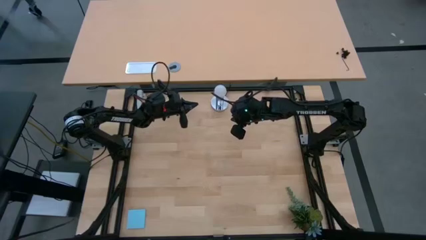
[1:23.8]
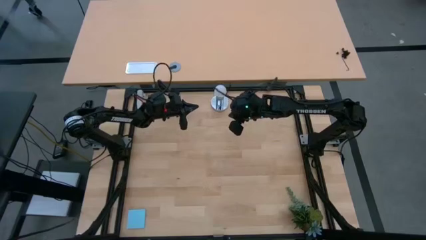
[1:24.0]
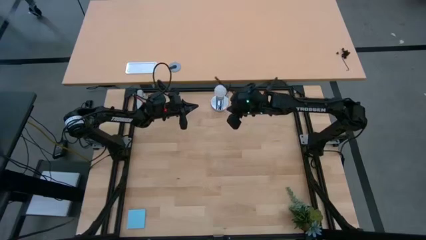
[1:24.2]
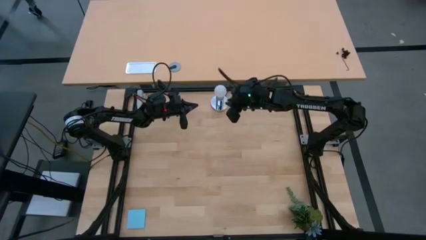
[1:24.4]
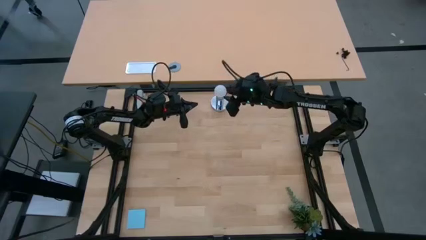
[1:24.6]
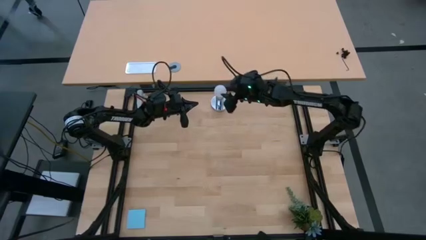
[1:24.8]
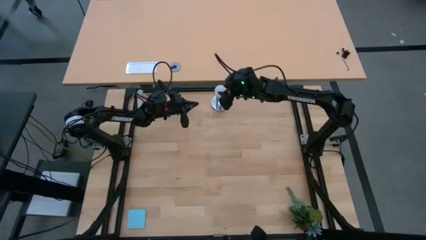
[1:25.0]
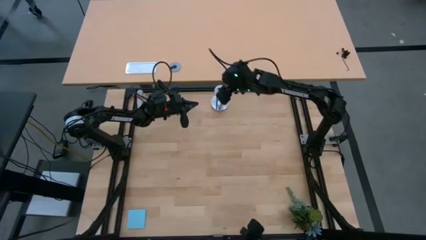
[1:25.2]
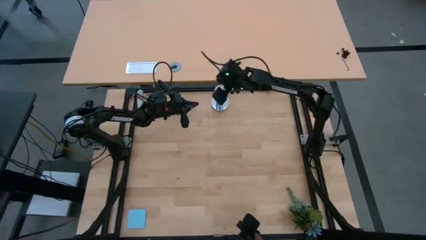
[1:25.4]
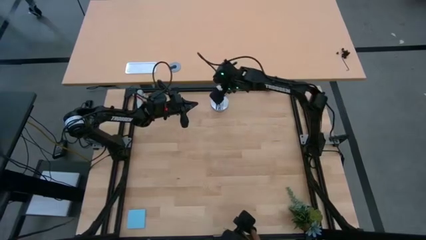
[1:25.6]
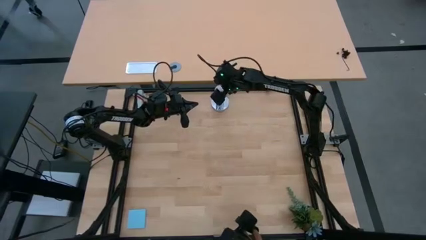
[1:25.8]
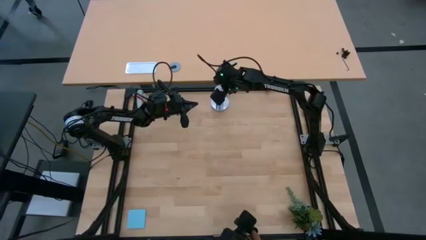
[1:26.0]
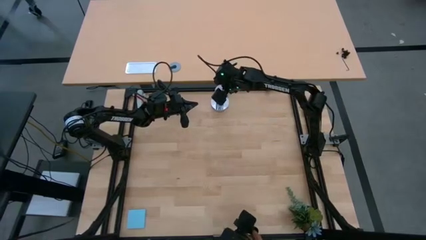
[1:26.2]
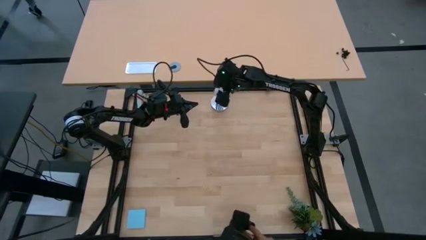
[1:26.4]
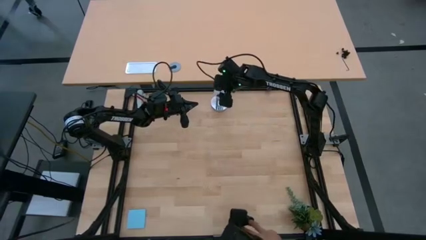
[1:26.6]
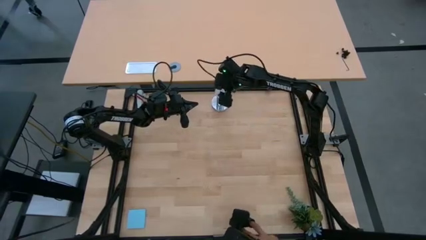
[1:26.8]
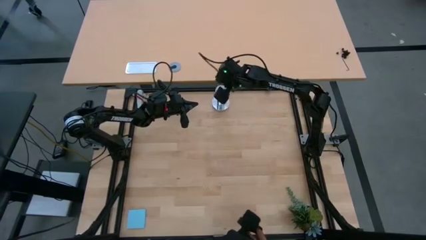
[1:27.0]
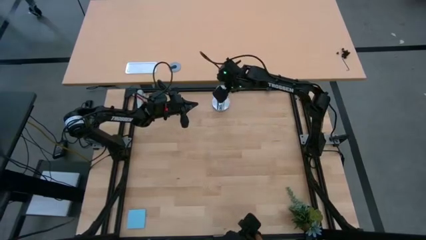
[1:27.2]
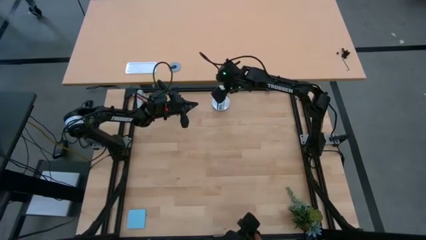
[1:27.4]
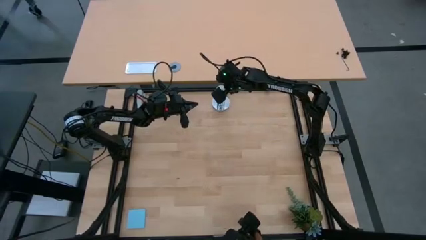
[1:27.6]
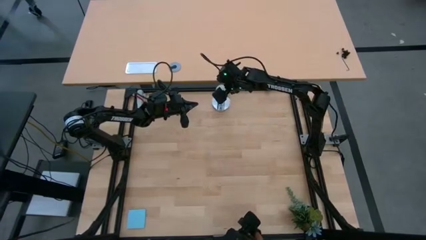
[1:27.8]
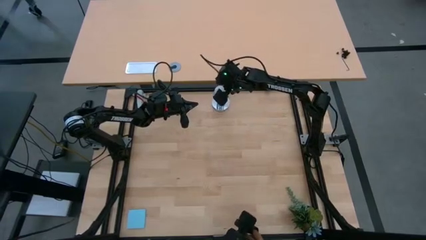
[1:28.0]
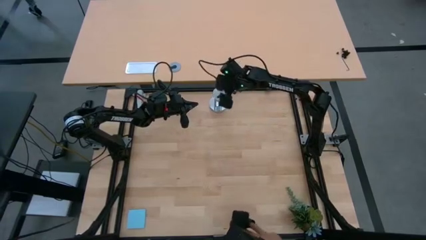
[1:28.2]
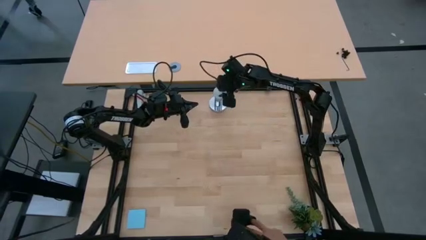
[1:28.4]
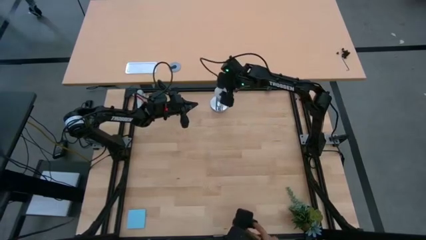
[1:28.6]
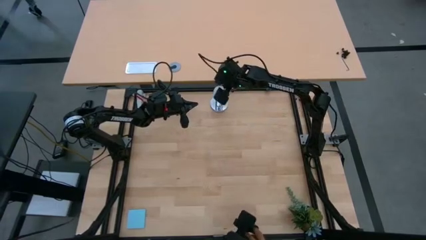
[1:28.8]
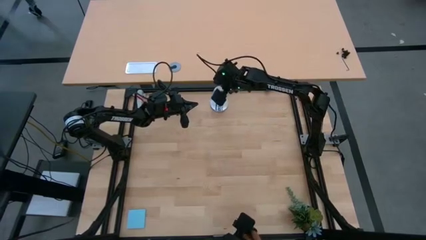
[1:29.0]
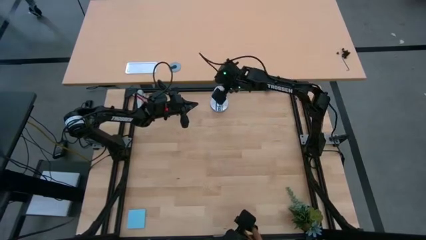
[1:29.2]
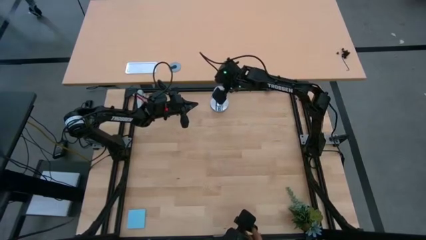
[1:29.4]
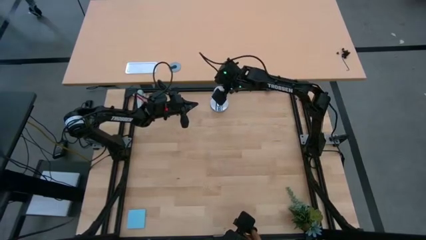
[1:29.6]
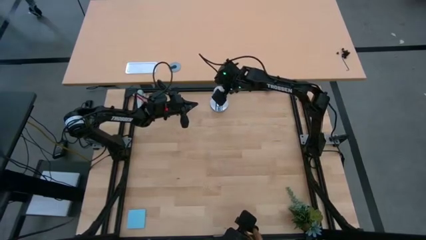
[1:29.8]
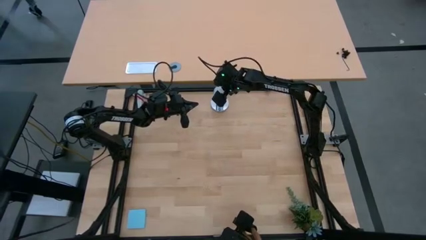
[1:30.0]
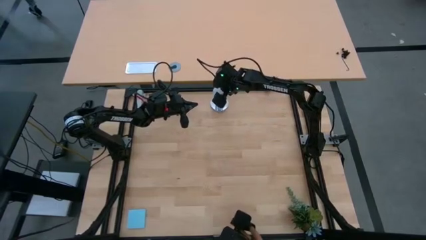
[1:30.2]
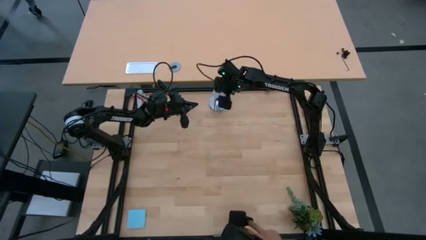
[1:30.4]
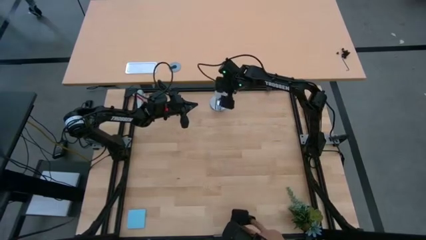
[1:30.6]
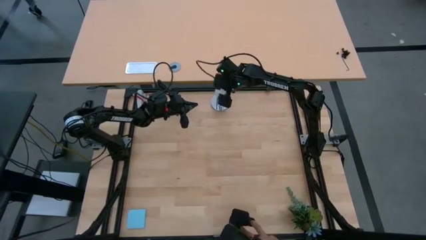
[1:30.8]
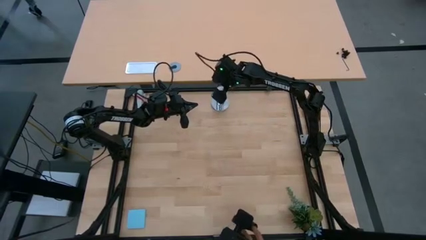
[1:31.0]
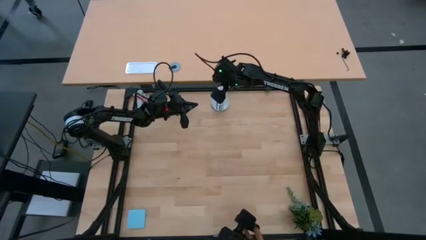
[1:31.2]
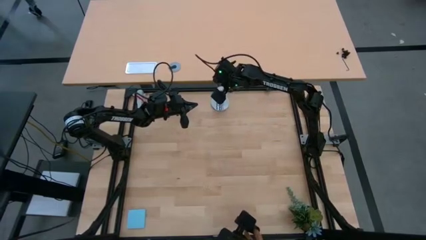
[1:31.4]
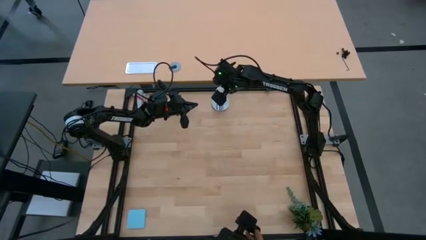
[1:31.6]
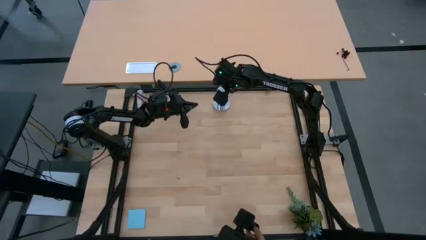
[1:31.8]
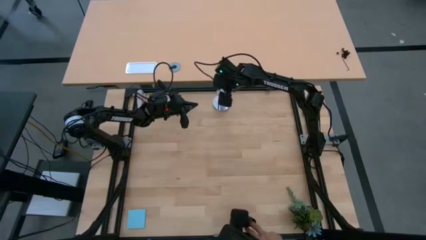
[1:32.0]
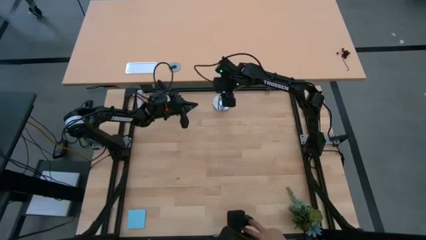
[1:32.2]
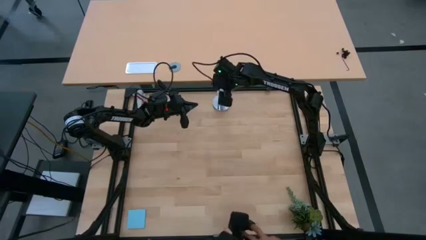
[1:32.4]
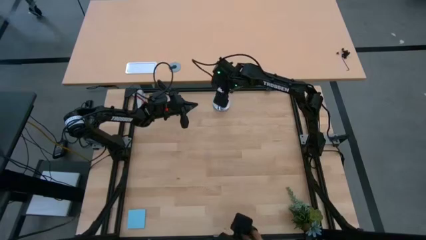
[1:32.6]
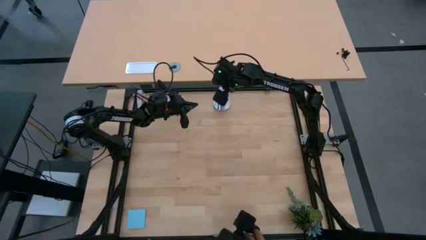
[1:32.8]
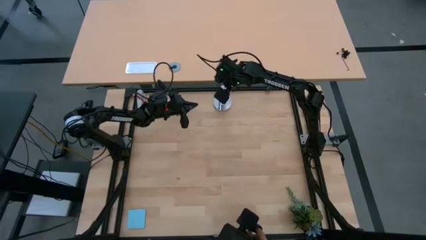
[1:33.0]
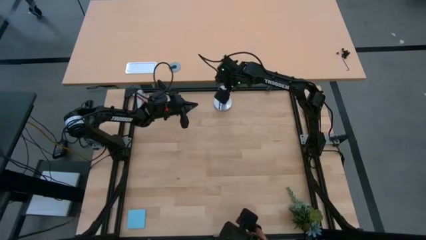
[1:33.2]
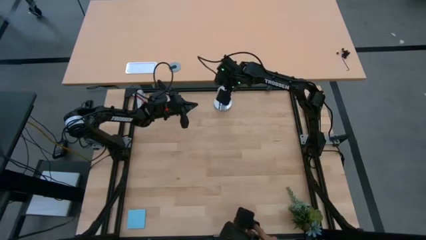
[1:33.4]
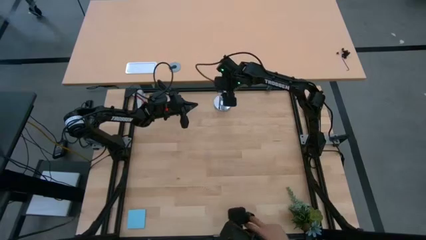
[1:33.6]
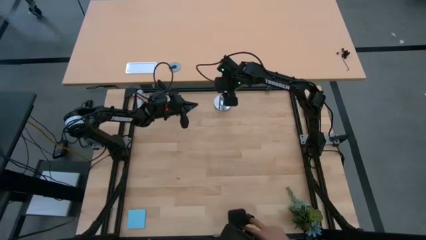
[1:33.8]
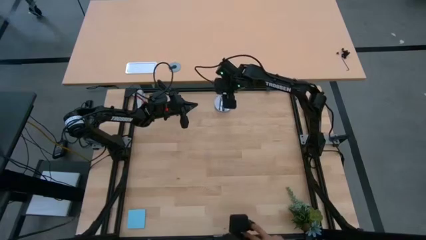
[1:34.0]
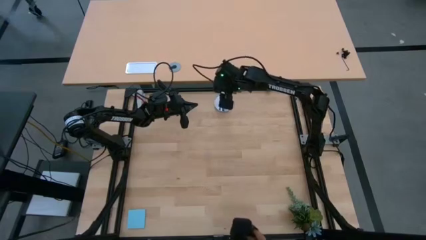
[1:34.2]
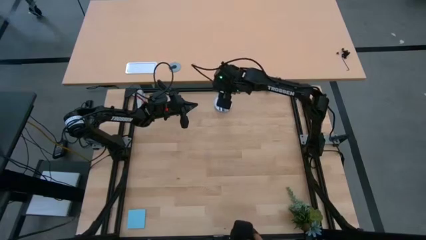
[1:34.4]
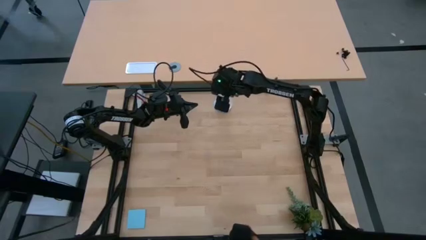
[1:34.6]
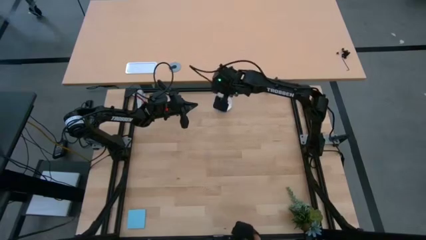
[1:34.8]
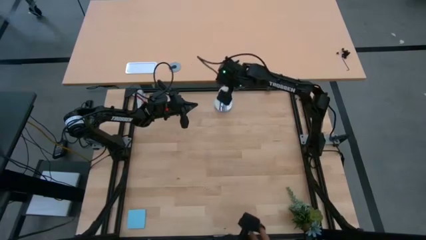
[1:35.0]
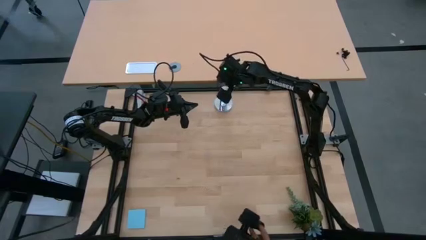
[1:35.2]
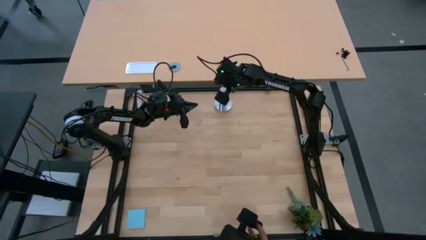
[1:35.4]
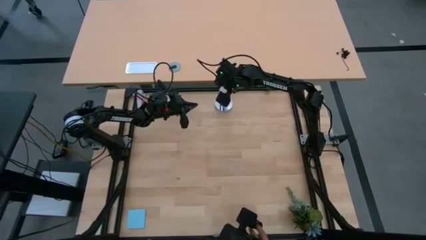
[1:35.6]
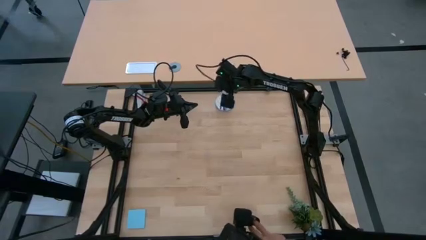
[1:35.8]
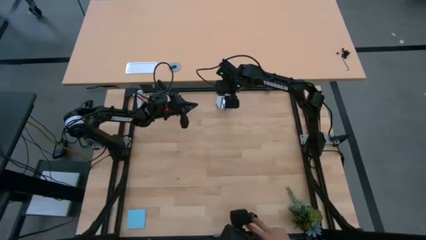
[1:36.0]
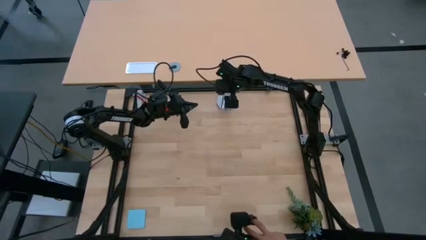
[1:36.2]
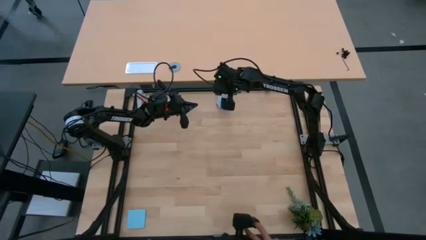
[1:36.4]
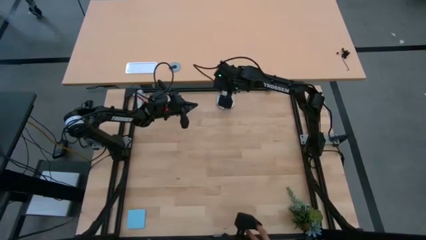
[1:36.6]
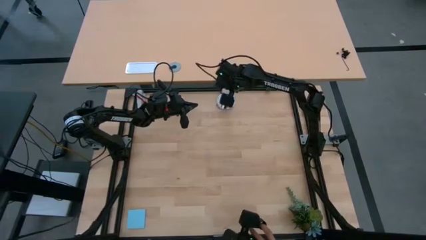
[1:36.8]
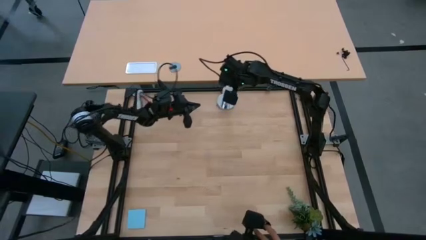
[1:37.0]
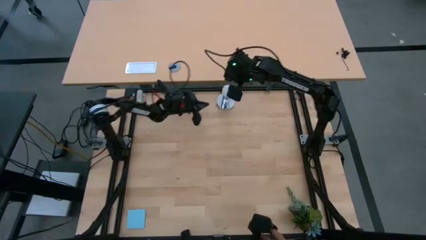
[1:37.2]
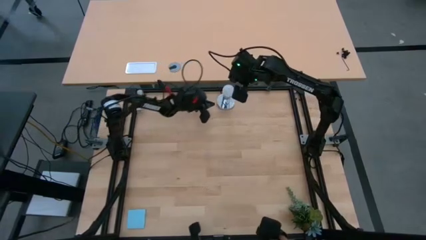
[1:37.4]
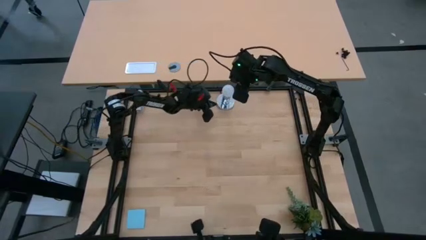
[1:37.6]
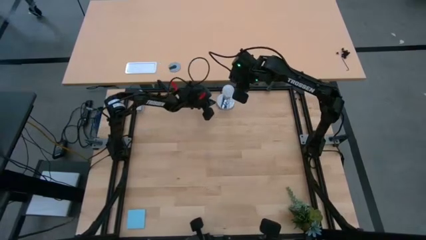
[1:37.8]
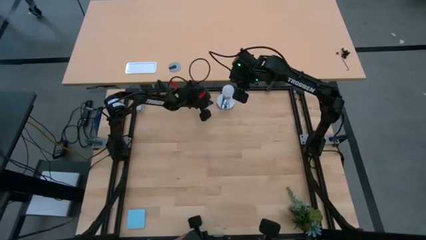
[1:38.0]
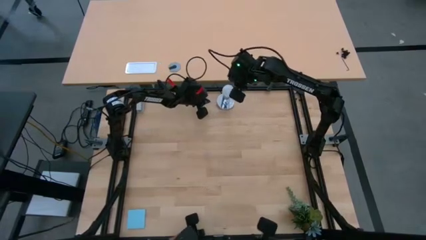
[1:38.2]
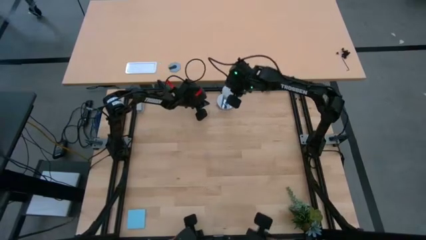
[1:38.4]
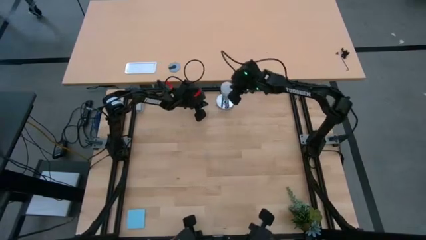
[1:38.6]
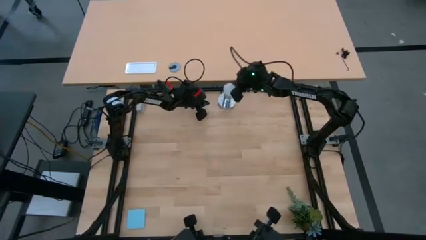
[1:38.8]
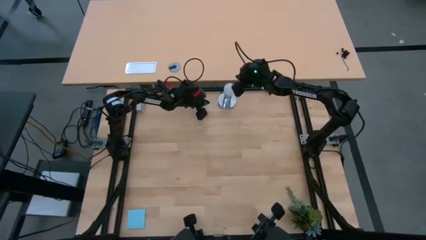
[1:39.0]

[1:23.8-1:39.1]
Task: Screw lightbulb
Remove the white lightbulb from the silver lamp

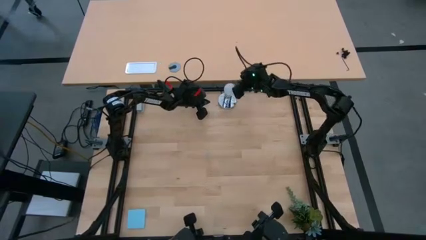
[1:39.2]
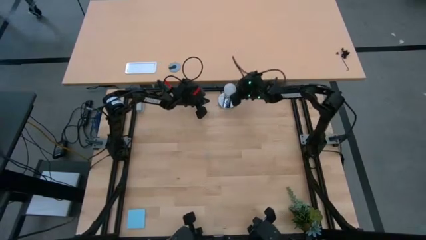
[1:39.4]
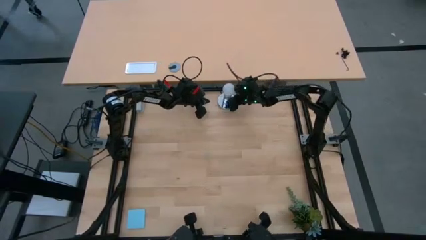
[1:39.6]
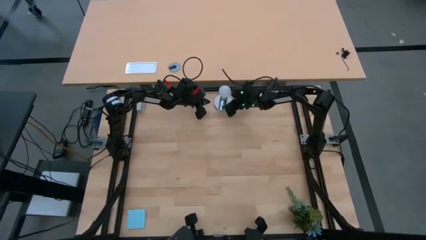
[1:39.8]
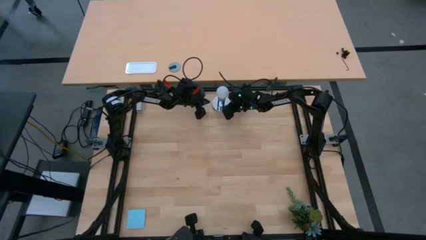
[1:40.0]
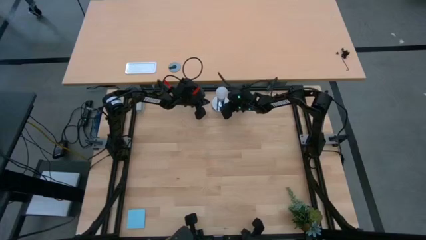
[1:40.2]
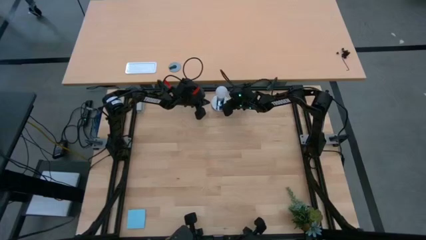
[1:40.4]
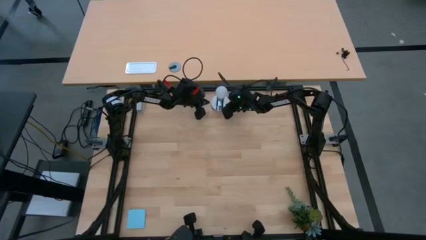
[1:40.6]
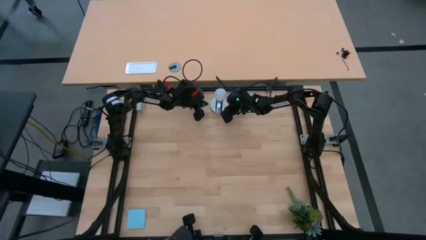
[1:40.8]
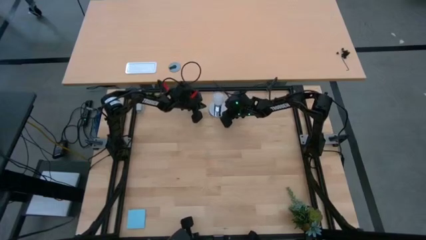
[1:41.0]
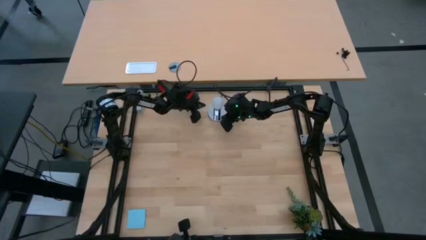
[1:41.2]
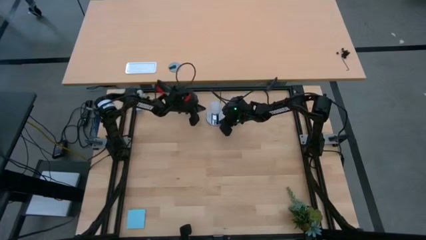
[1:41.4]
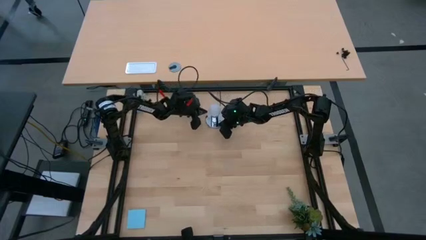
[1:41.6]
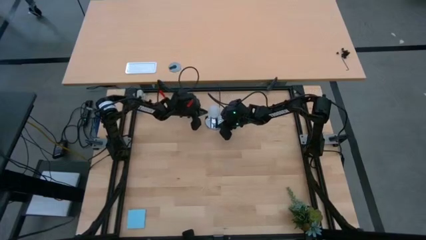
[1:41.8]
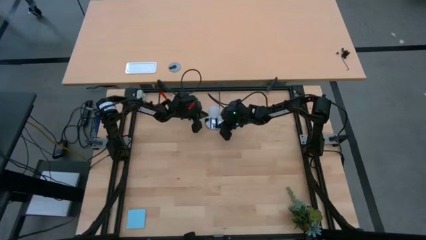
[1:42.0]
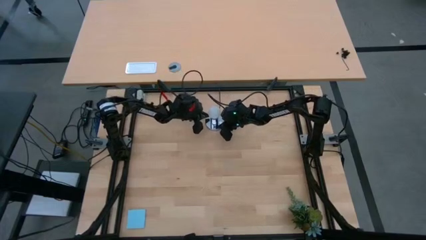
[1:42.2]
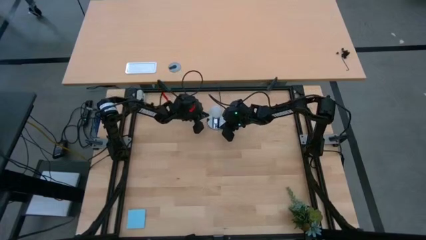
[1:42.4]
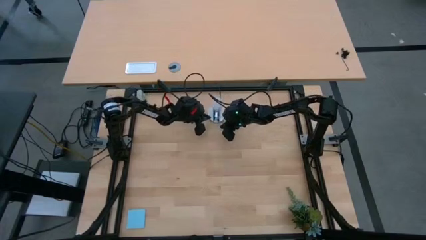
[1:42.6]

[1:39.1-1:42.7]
Adjust the silver lamp
